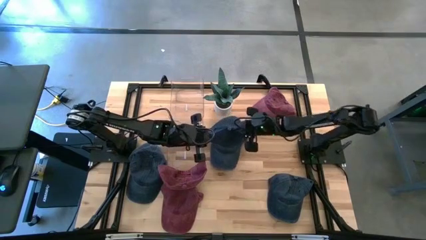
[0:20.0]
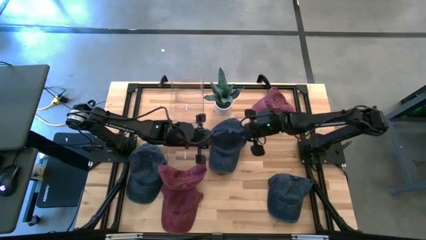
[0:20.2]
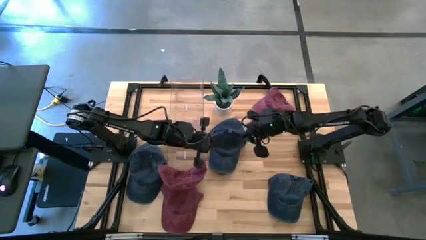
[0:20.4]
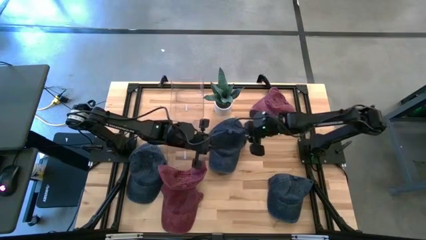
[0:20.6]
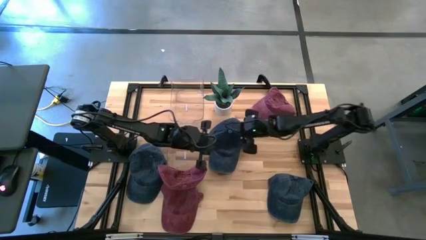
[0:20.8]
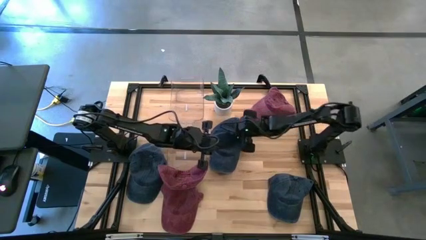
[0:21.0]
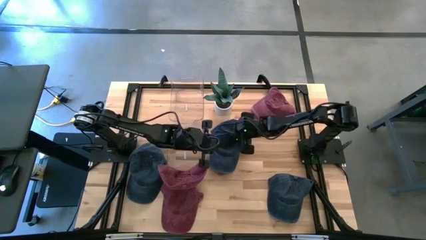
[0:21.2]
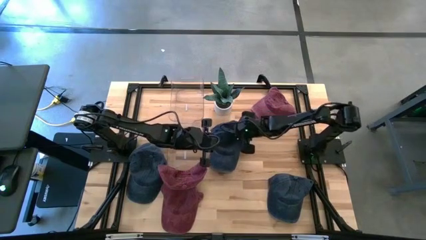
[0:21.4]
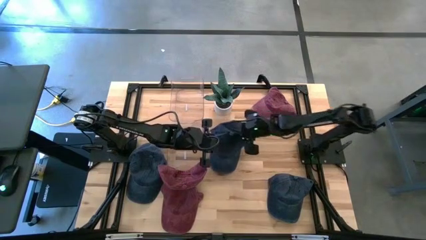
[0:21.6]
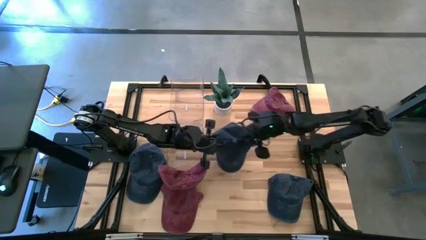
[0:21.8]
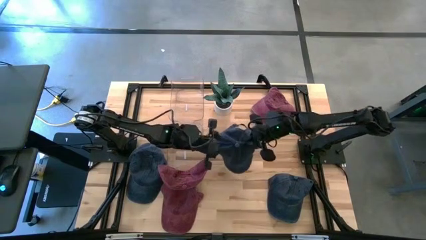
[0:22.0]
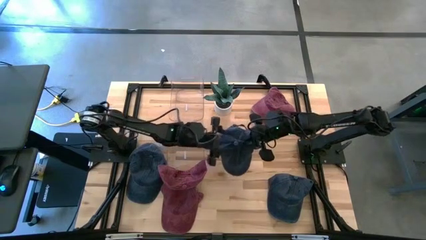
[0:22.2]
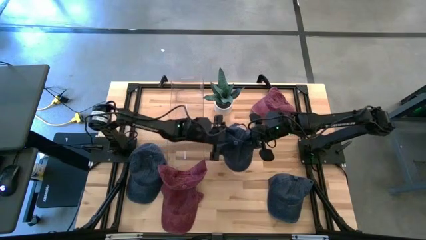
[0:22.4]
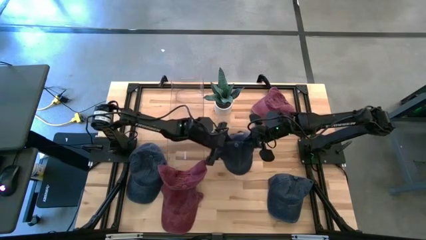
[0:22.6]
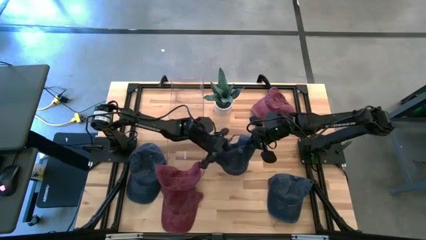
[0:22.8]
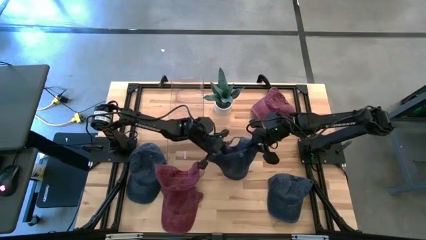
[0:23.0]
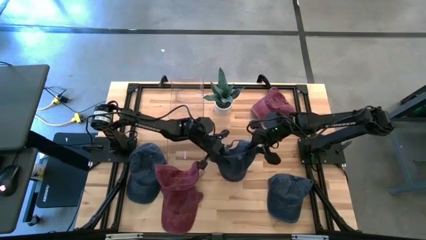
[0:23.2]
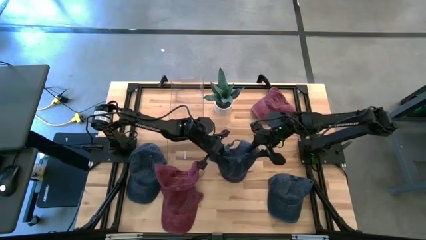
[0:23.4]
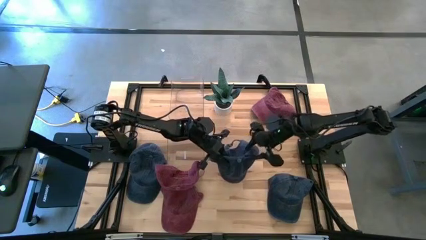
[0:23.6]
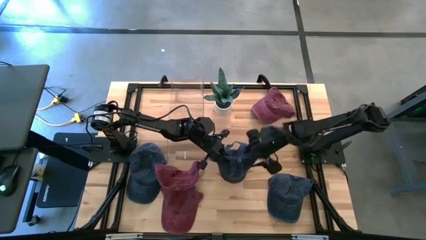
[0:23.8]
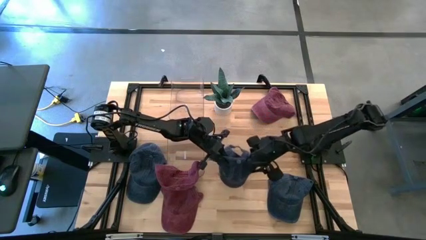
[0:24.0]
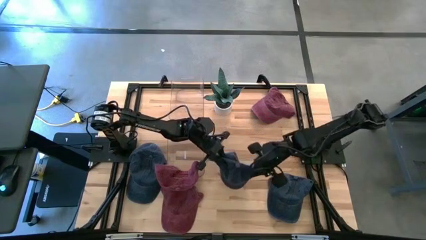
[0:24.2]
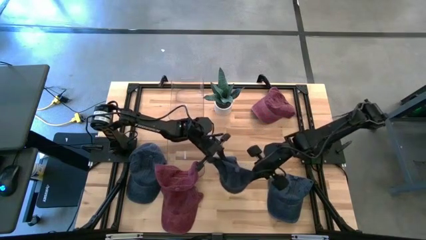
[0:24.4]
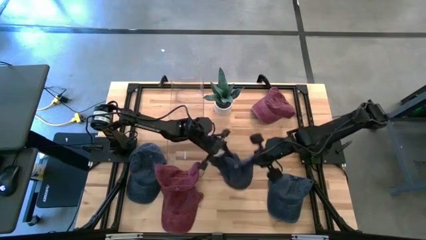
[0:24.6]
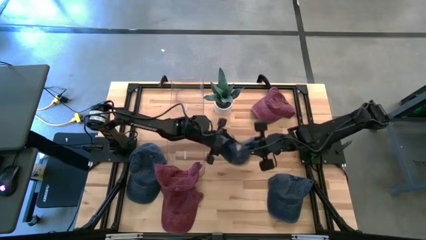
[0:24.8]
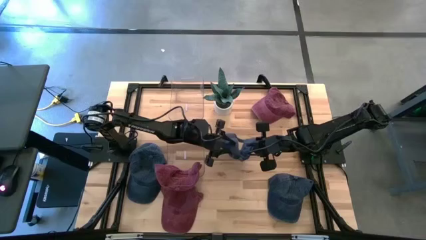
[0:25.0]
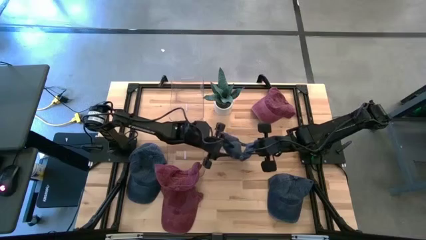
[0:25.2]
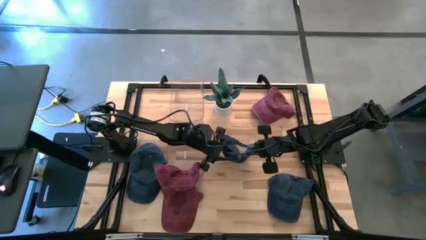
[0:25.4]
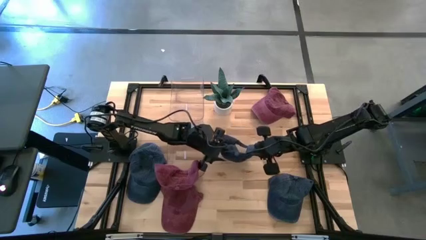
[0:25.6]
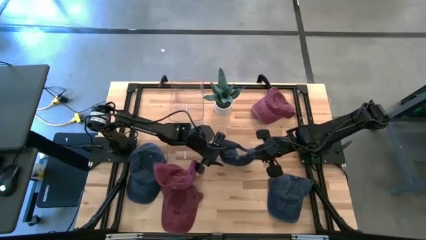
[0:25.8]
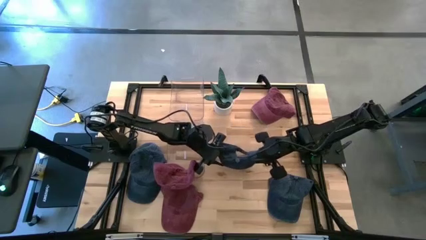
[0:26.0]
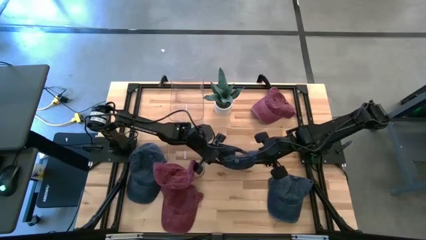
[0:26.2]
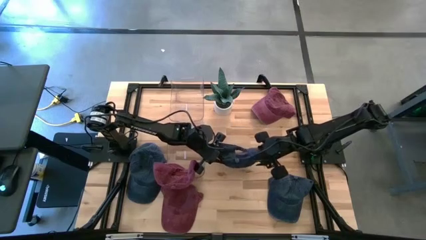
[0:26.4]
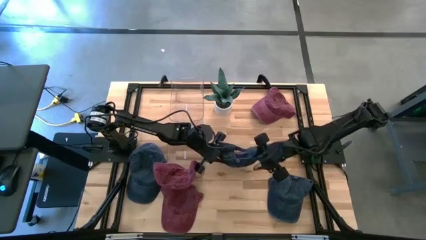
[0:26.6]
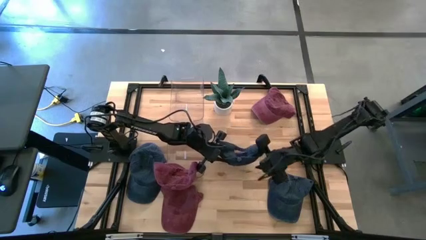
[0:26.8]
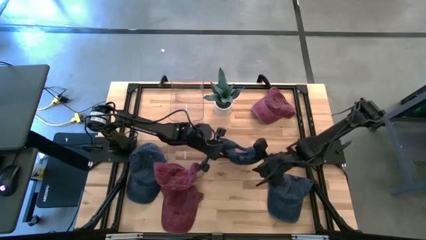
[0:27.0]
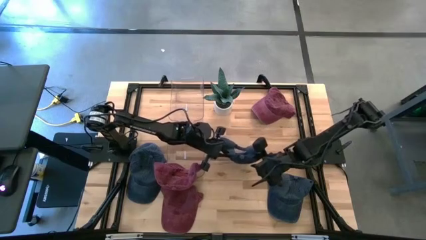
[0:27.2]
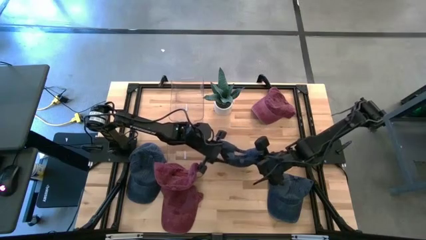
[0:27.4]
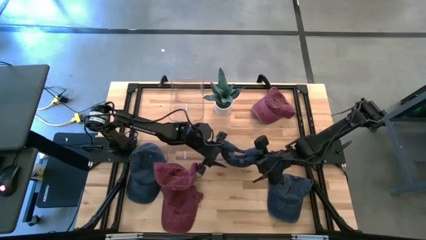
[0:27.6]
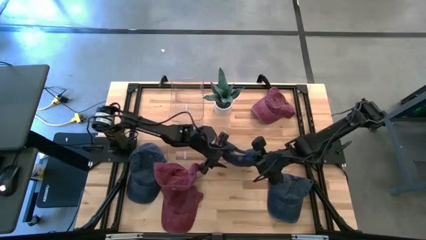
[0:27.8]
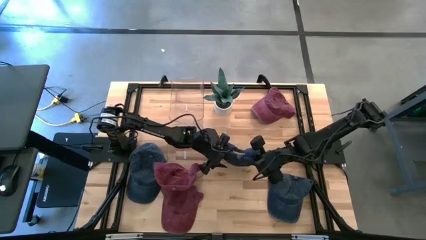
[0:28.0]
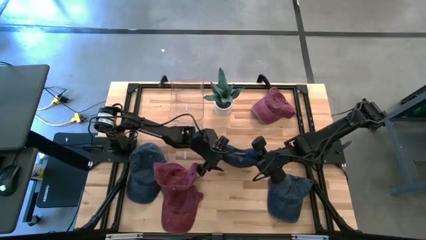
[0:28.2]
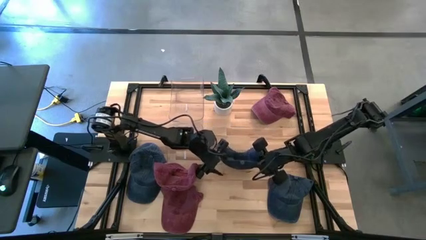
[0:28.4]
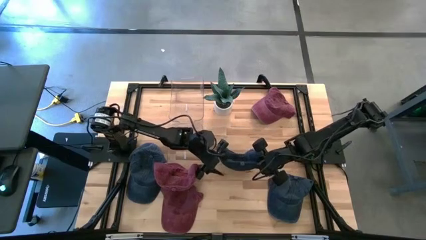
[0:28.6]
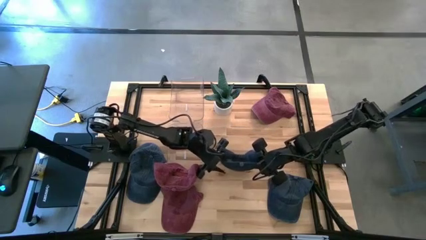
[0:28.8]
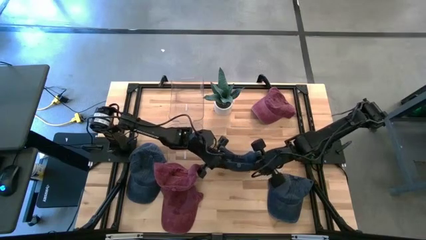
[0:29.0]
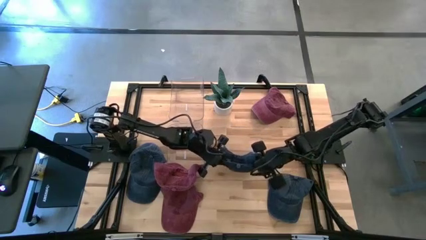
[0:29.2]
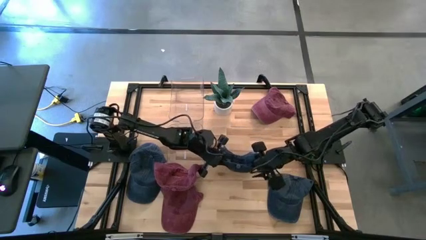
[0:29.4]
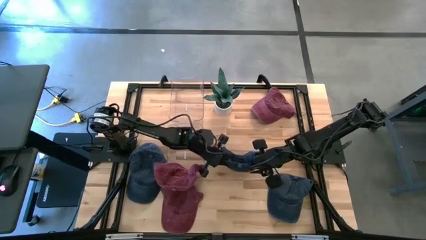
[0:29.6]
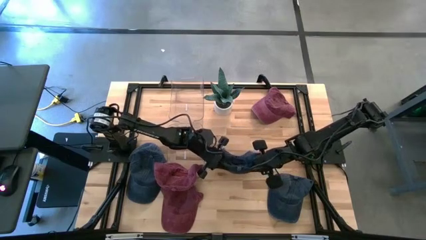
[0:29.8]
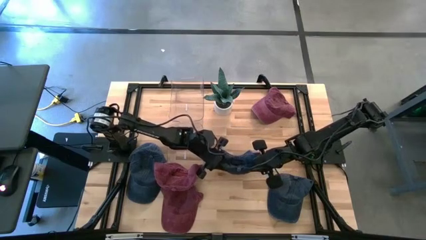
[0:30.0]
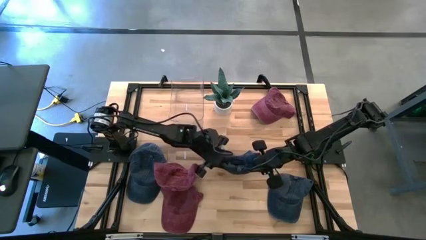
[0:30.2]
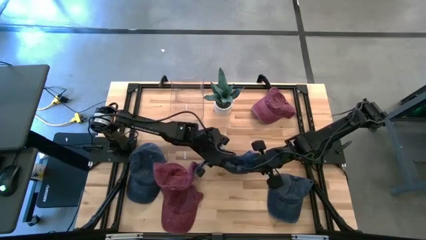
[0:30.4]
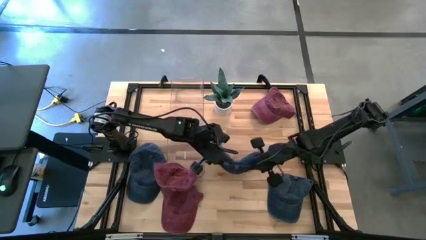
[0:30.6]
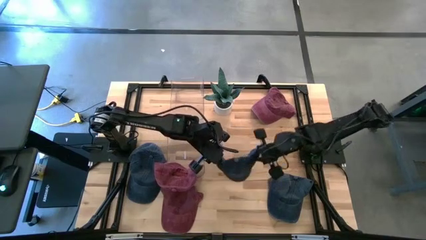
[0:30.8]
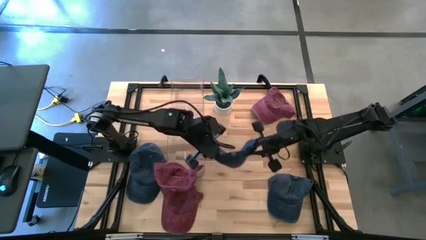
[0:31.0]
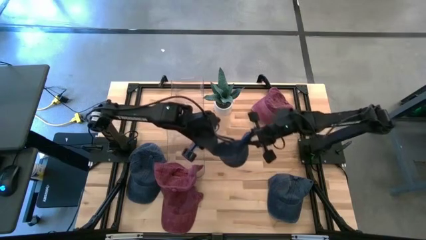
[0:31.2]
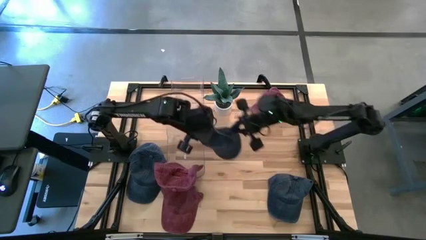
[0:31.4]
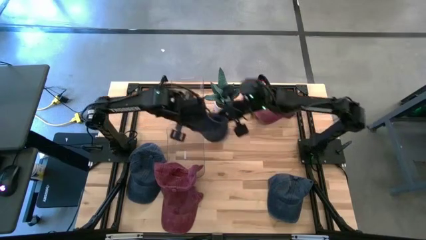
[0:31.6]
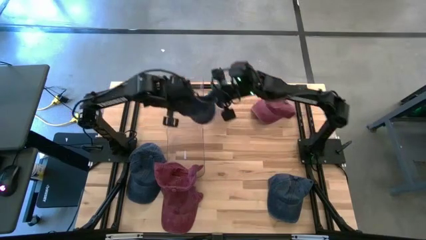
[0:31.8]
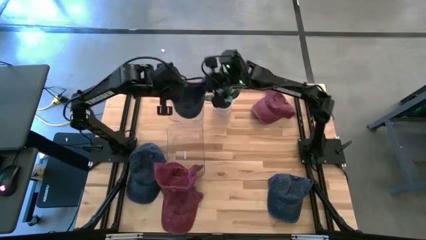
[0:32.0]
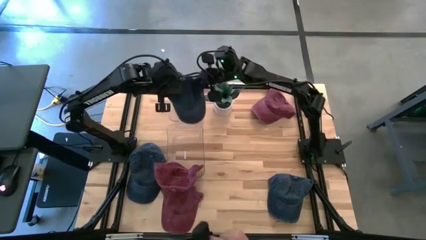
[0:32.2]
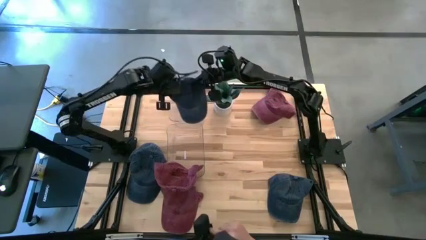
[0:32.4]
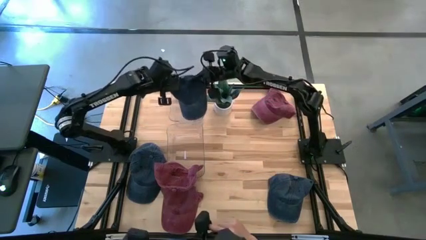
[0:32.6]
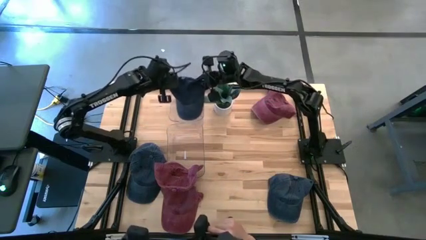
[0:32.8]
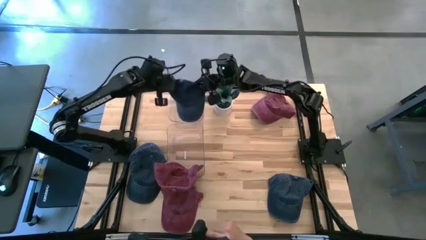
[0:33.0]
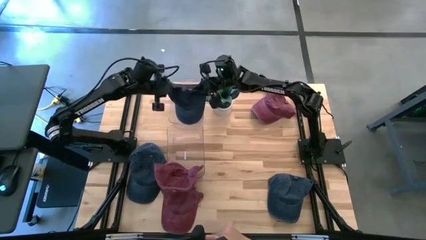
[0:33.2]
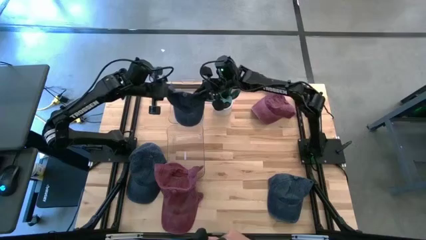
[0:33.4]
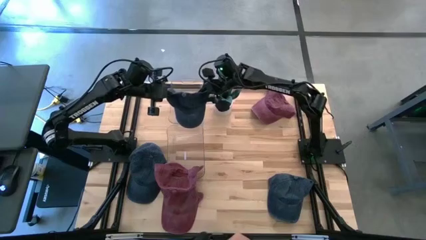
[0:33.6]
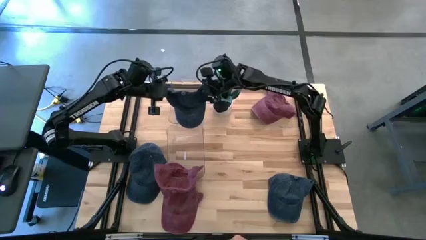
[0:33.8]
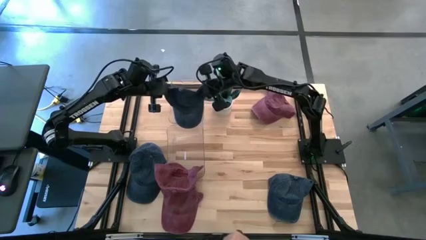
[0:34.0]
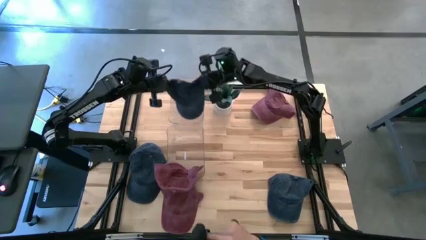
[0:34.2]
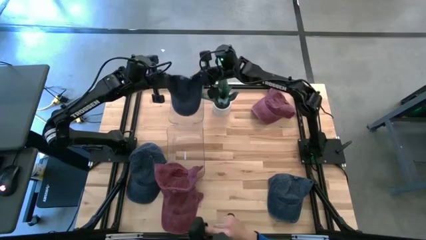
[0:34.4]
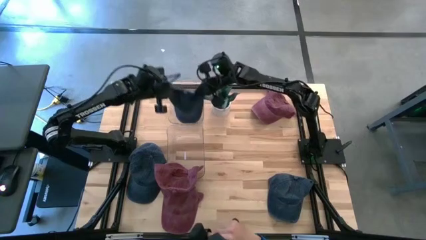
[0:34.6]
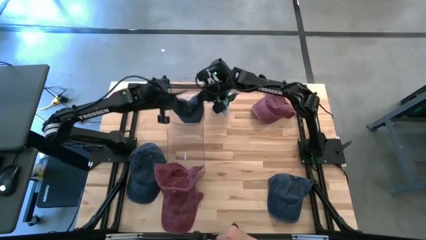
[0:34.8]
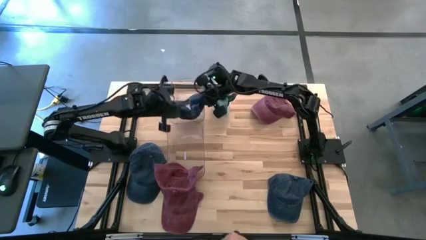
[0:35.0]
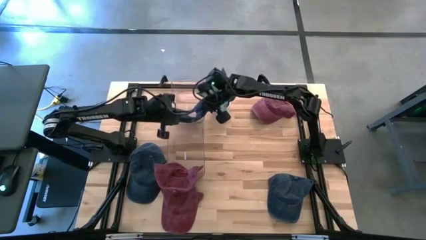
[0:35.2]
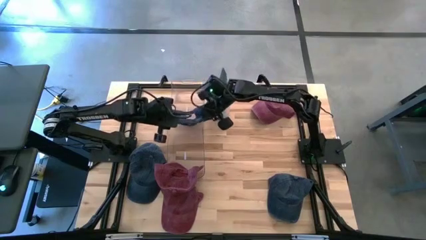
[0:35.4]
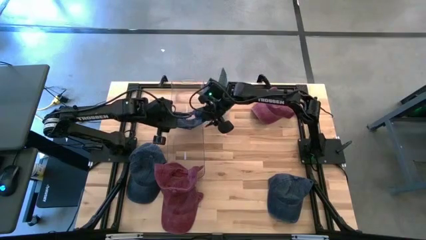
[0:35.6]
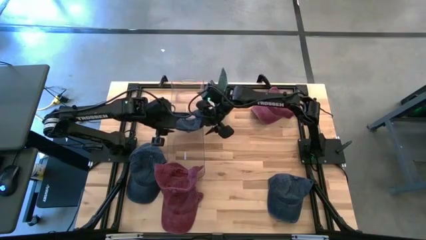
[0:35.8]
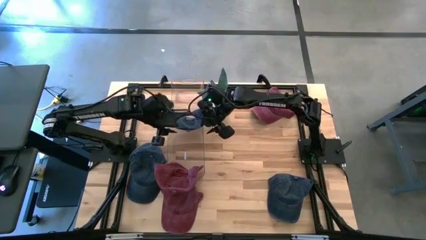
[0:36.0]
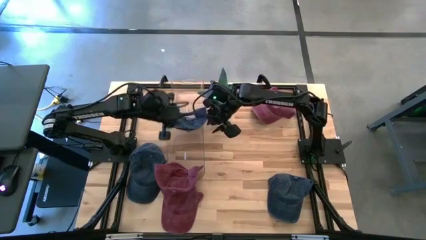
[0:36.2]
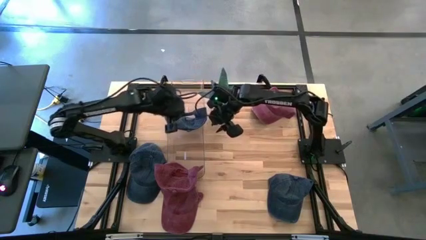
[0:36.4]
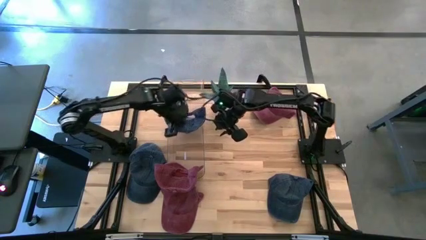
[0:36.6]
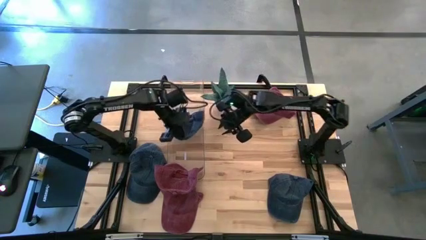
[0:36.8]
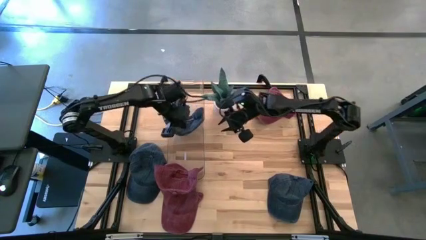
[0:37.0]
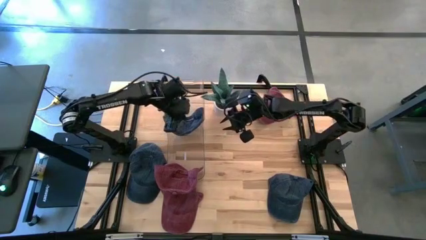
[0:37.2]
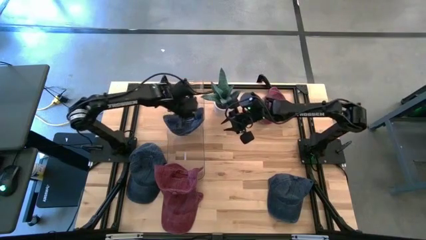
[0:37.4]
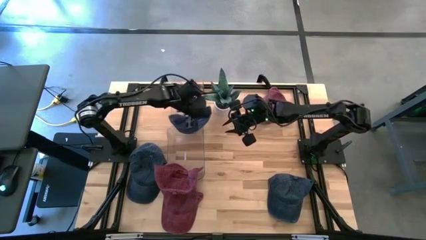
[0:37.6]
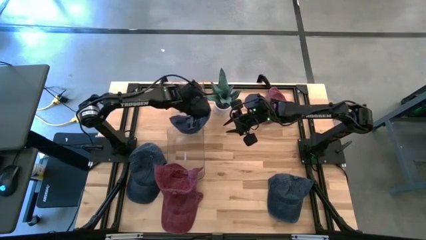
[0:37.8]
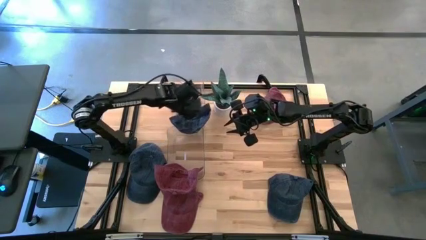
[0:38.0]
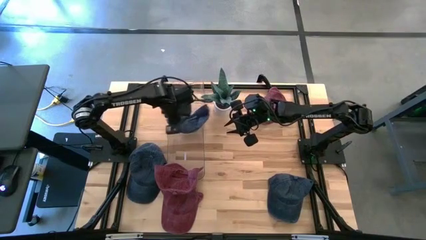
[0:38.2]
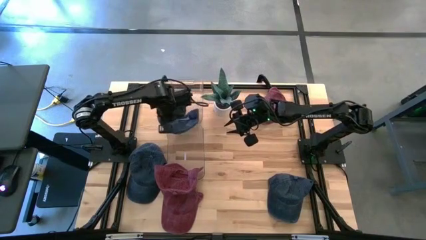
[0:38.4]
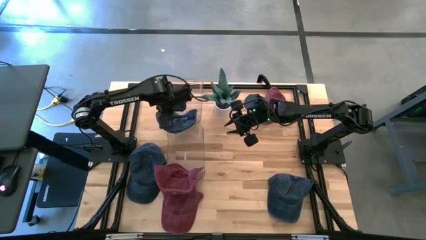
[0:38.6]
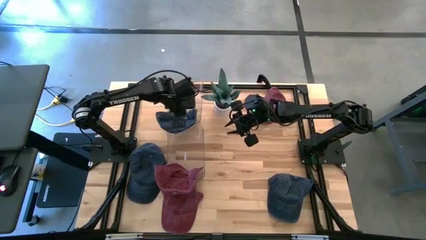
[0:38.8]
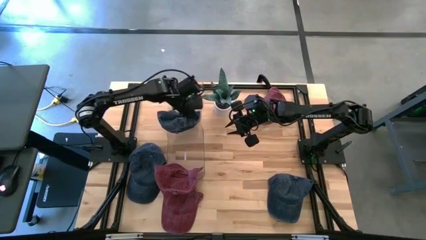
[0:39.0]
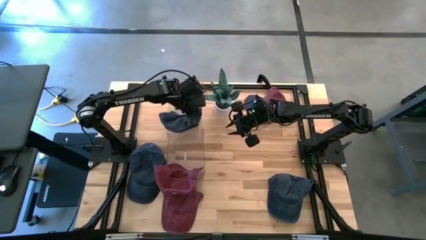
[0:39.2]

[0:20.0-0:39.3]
Task: Pick & Place hat
Put the top blue cap into the top transparent bin
